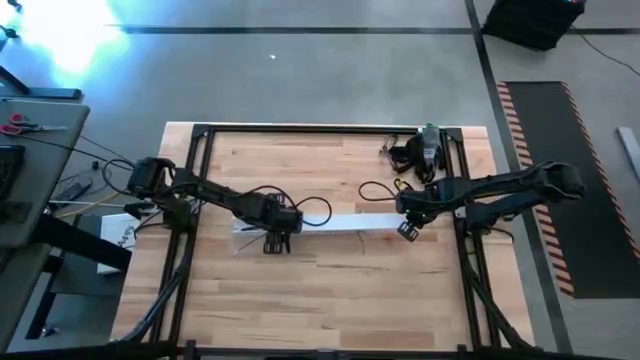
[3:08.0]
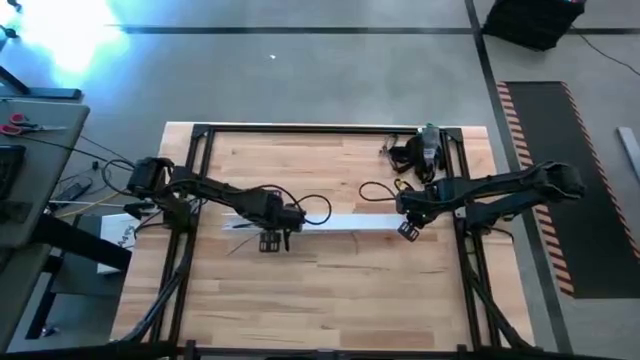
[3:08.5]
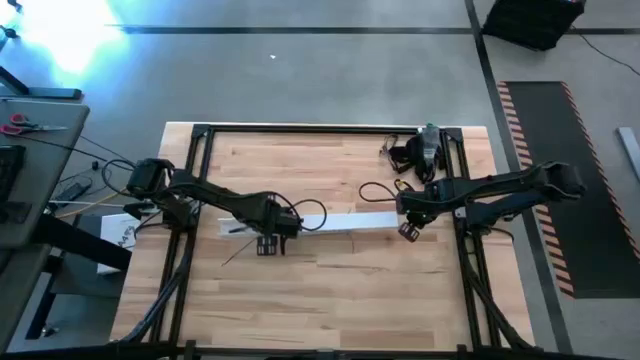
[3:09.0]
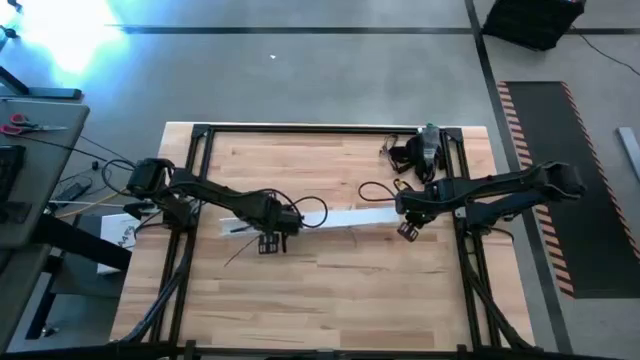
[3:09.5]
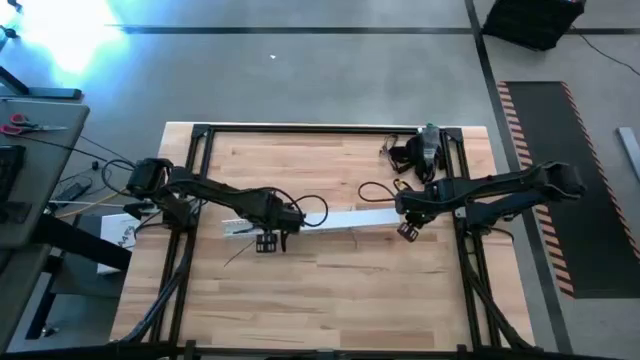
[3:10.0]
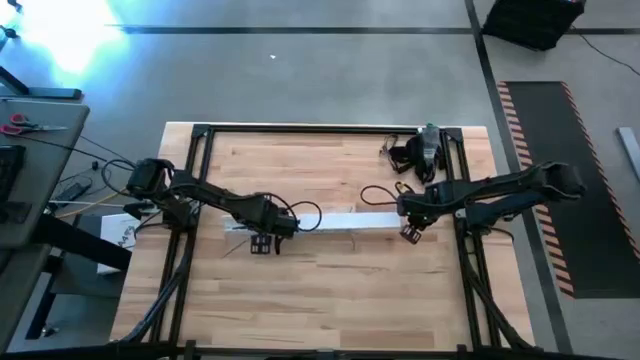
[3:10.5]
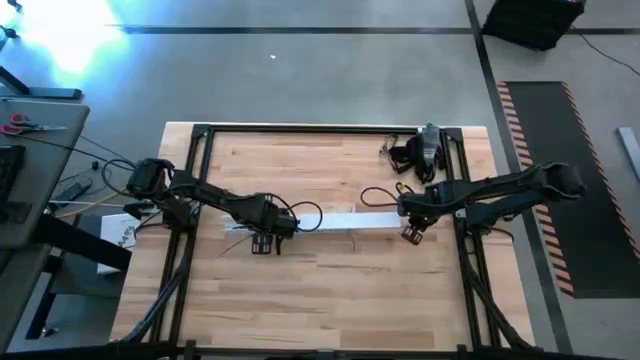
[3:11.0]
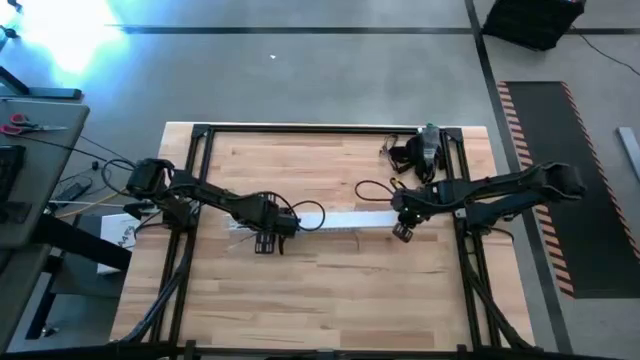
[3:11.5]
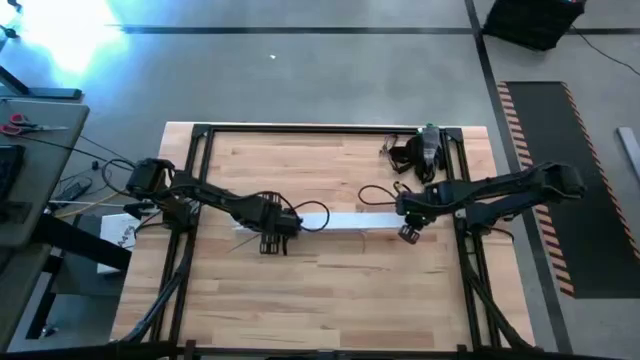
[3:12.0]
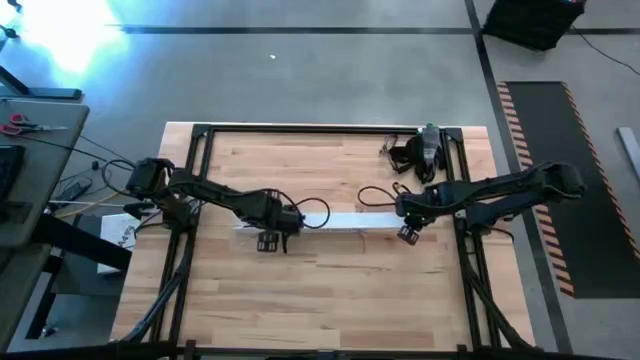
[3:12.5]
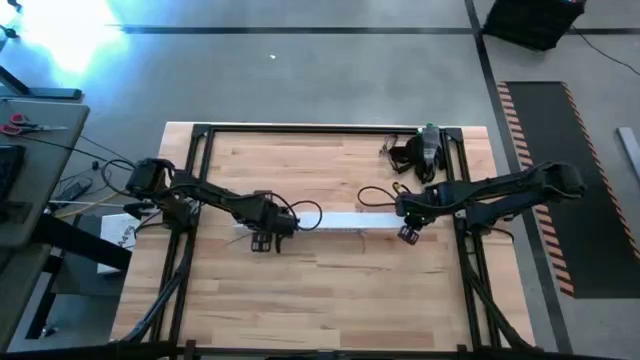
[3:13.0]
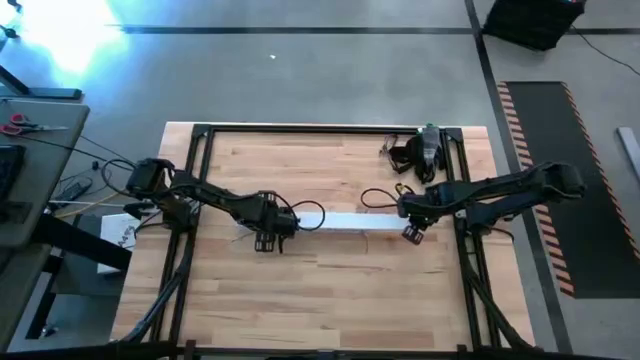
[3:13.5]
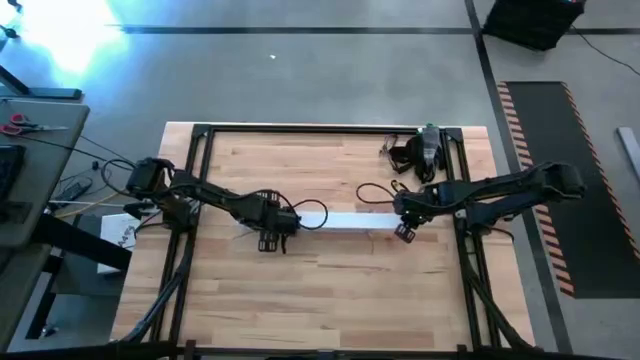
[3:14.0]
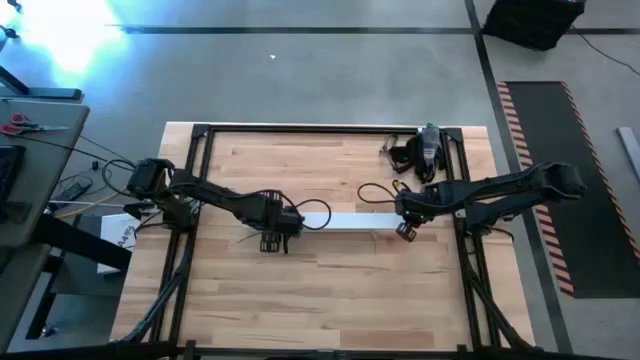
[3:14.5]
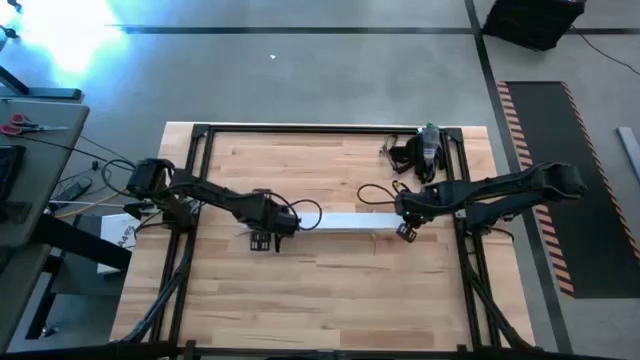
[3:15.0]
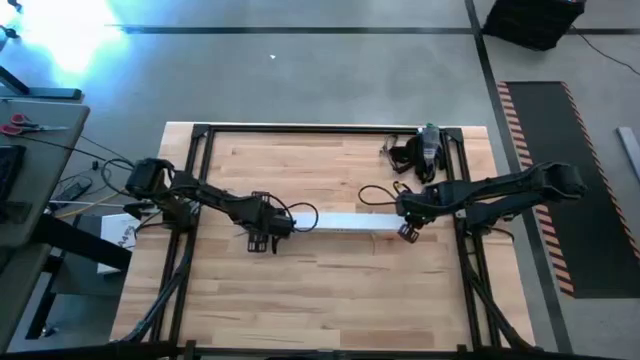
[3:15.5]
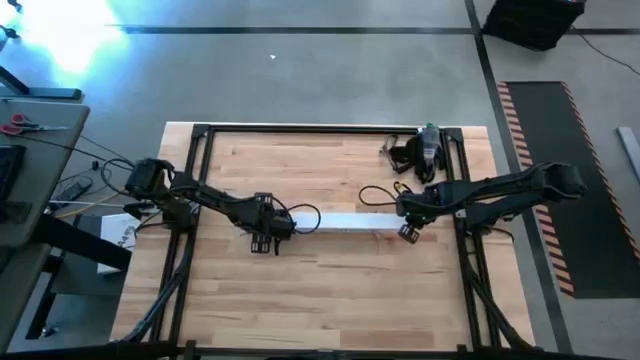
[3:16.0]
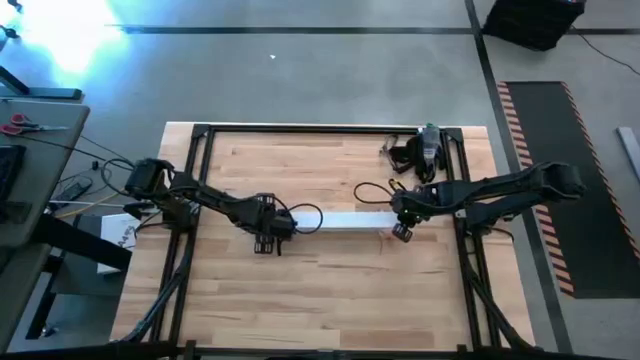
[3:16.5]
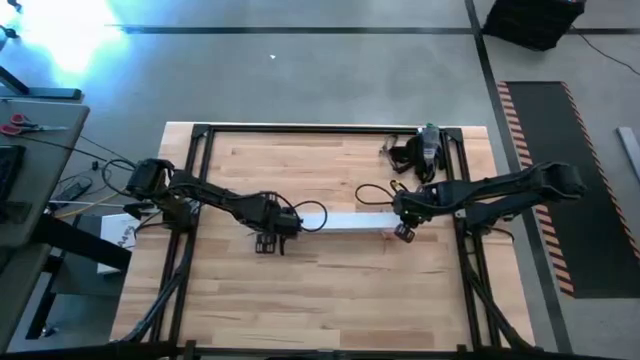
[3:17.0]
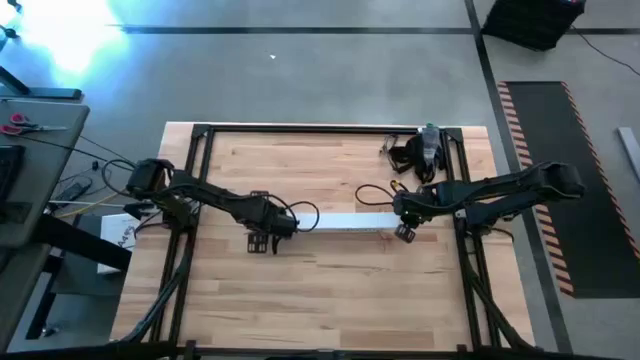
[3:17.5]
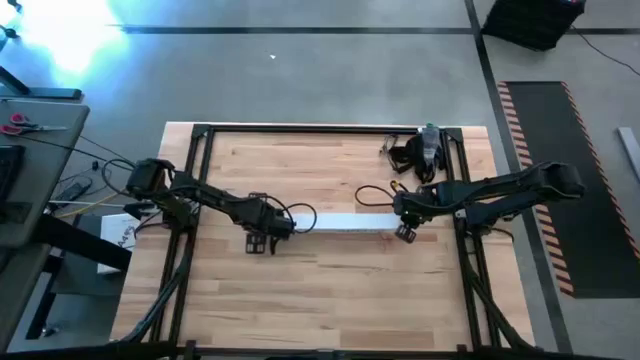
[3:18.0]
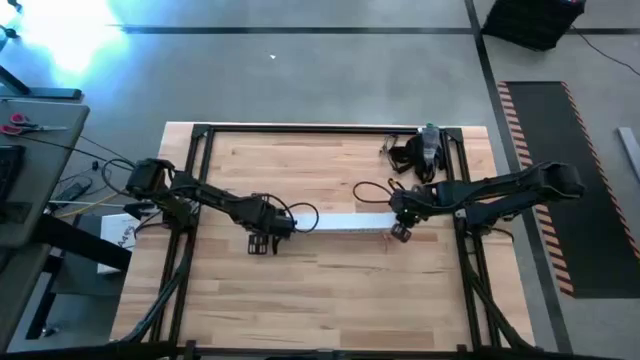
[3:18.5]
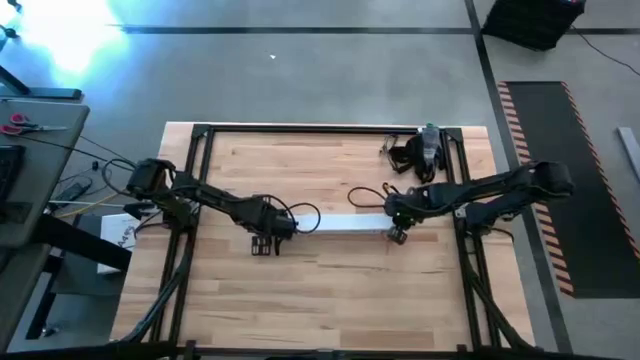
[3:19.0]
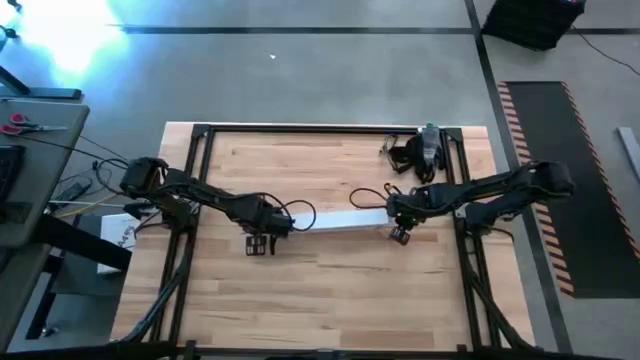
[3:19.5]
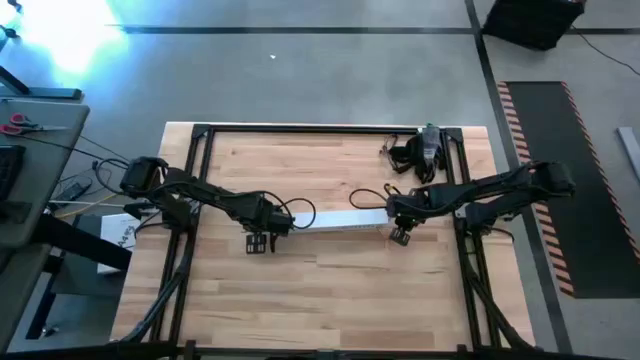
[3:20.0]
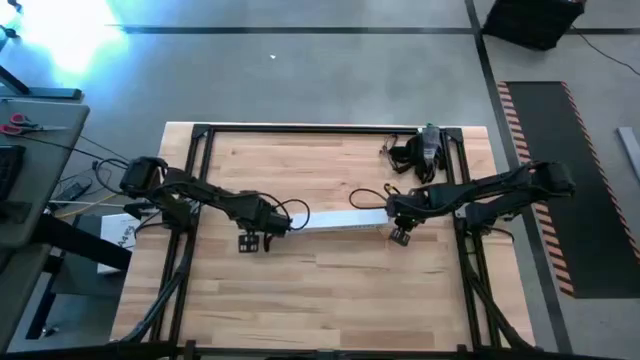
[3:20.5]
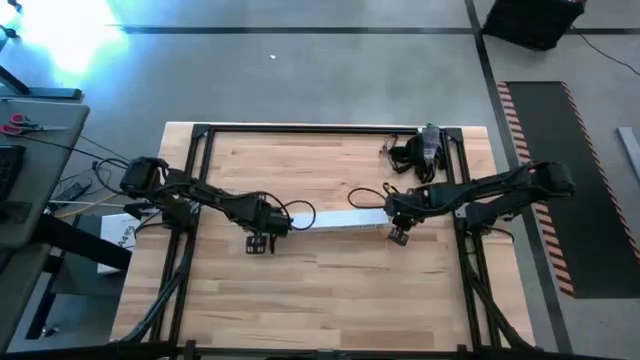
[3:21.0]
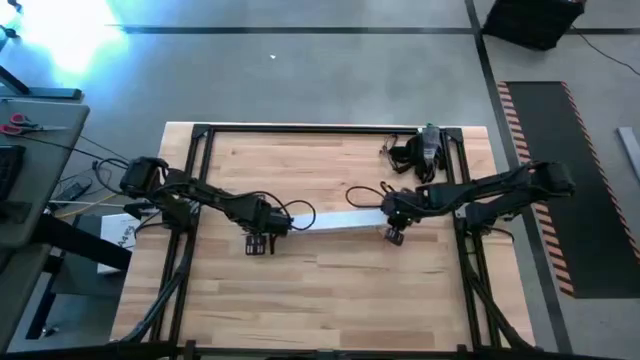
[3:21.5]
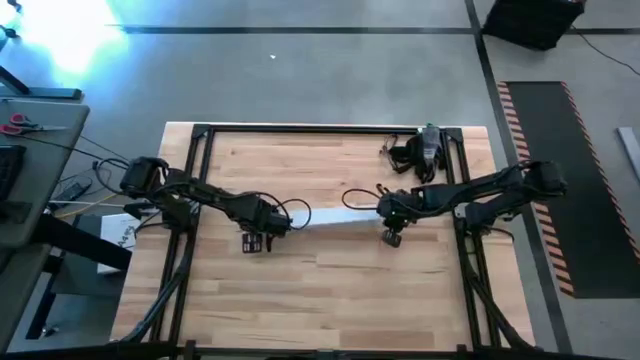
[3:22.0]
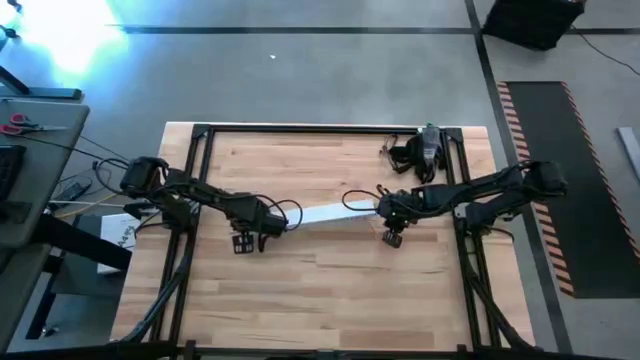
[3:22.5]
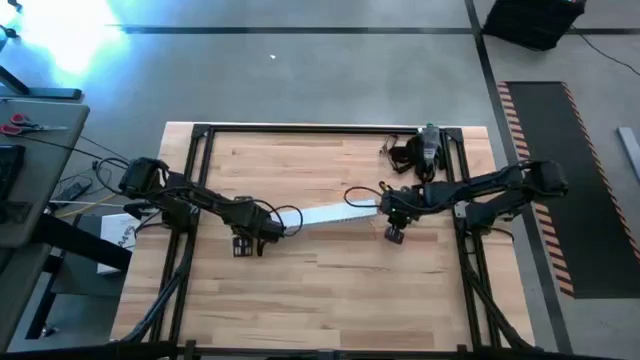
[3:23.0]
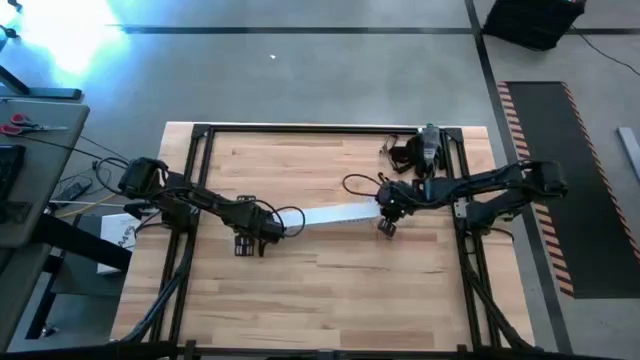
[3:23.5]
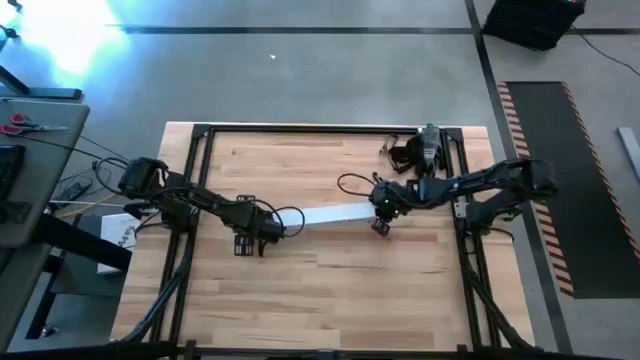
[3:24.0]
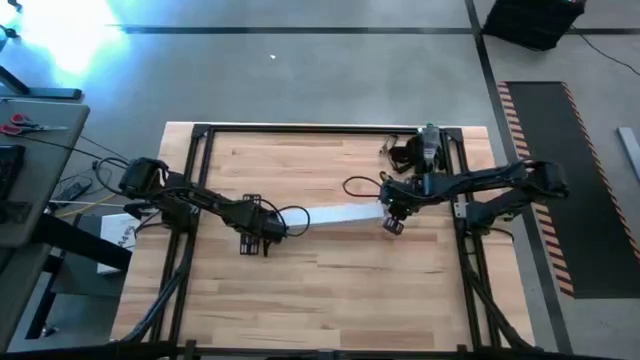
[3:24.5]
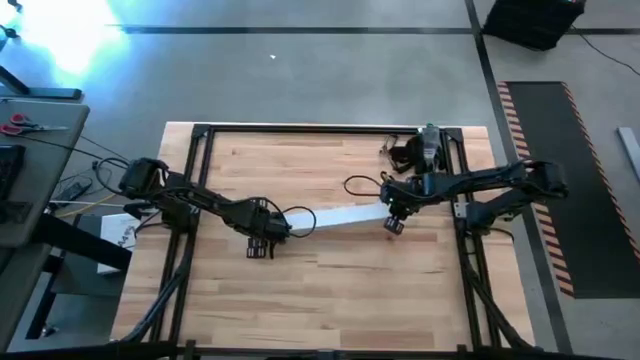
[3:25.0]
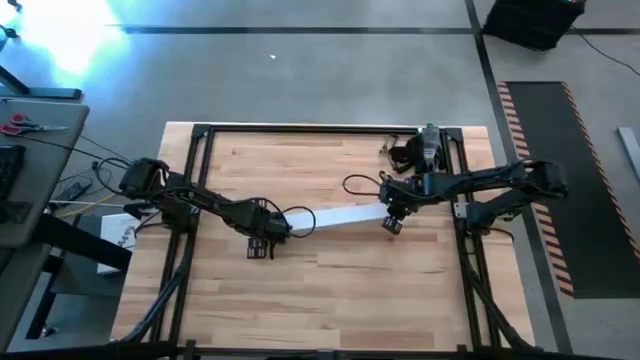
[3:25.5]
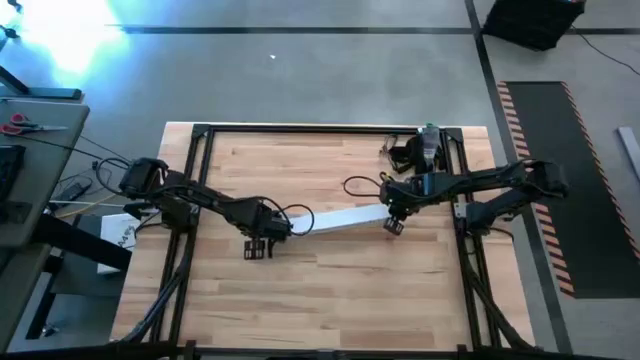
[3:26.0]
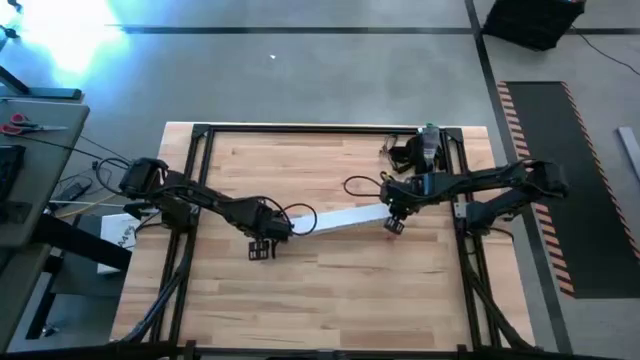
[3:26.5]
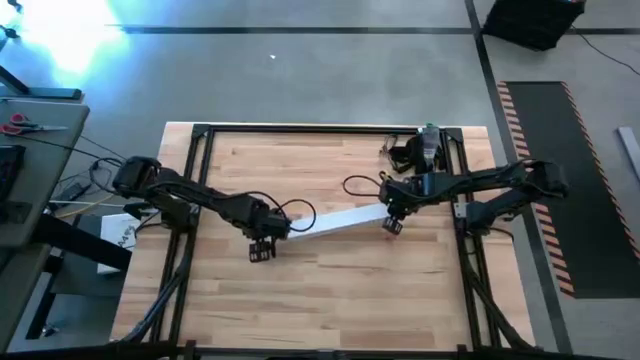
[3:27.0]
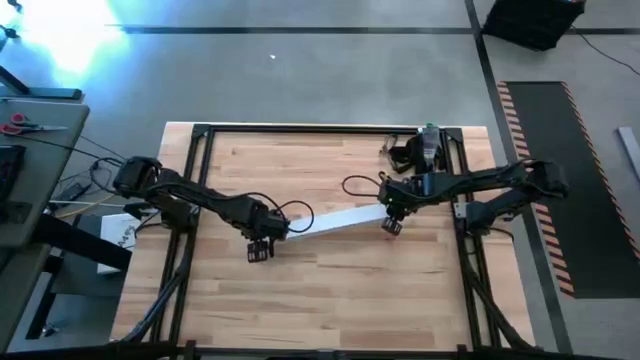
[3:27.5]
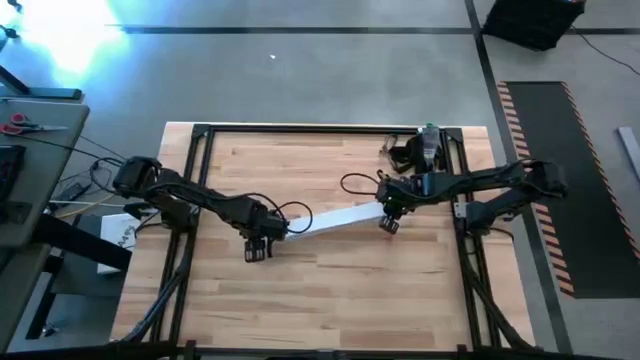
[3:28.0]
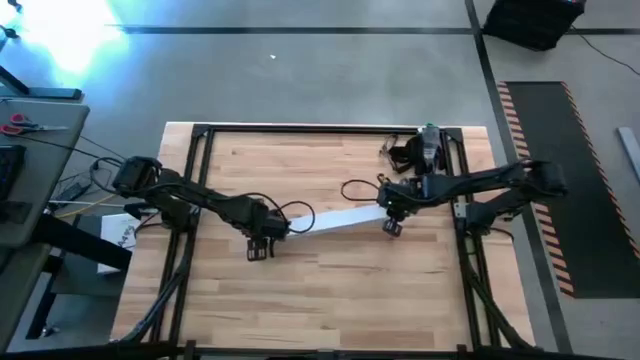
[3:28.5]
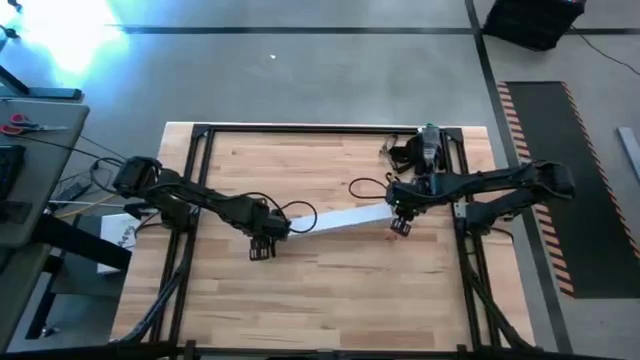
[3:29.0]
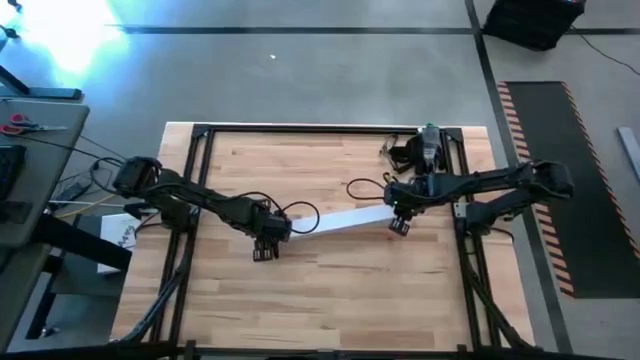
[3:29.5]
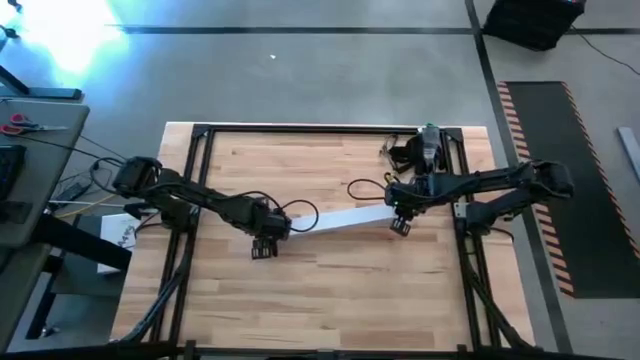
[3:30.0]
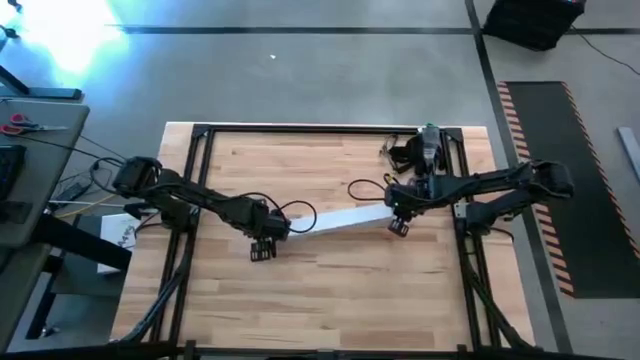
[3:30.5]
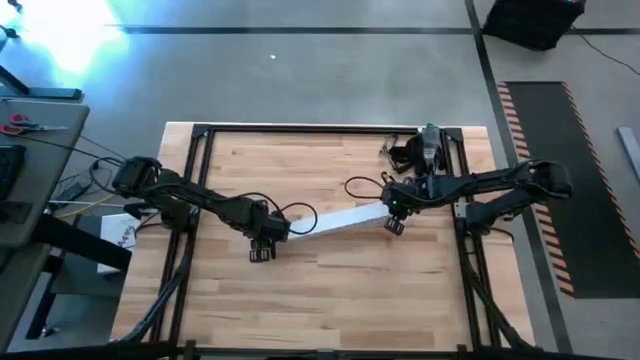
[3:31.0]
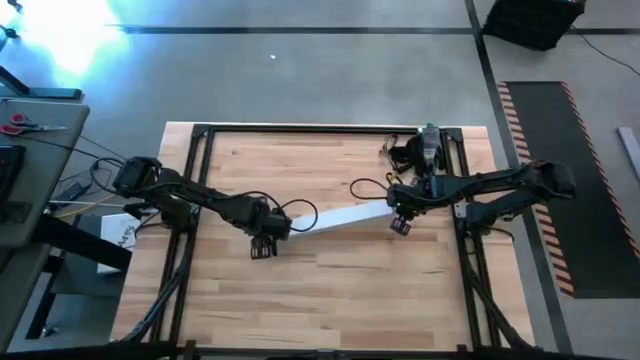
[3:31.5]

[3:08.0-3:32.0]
Task: Ziptie cables
Close the white cable duct
